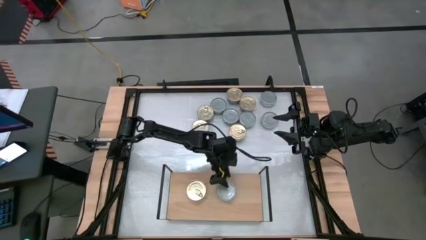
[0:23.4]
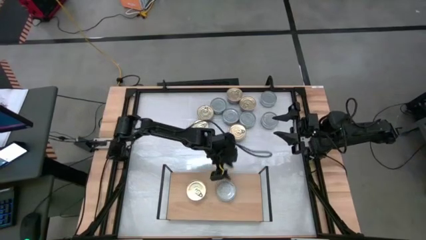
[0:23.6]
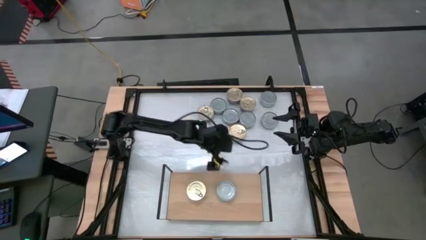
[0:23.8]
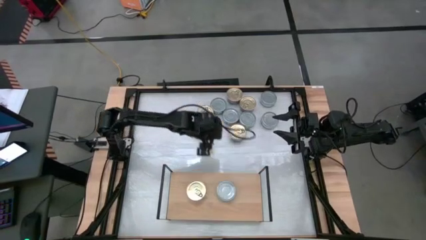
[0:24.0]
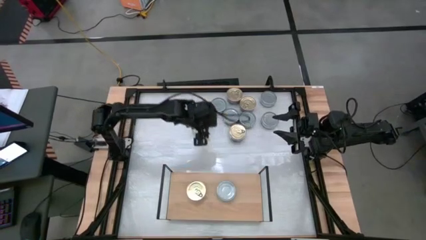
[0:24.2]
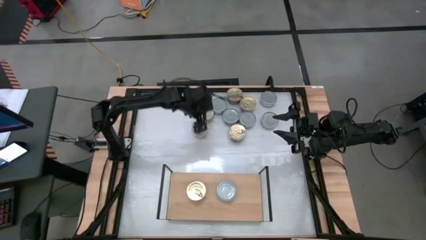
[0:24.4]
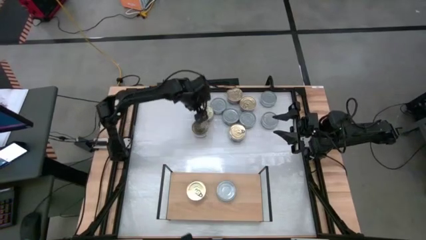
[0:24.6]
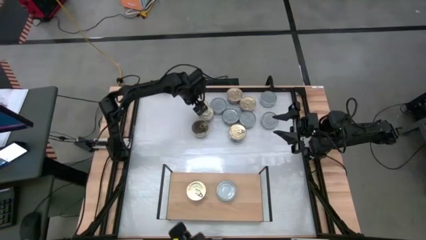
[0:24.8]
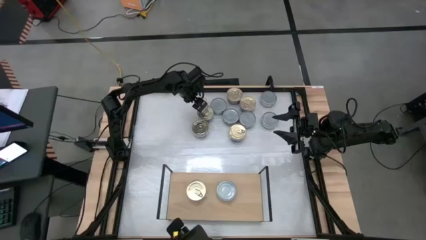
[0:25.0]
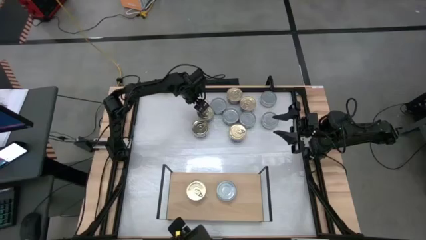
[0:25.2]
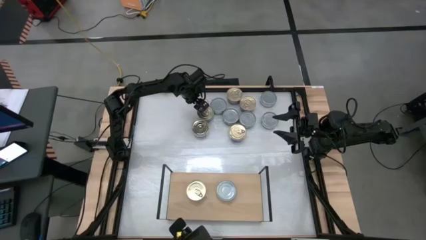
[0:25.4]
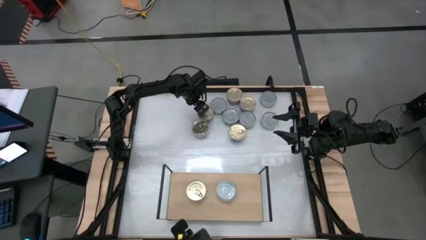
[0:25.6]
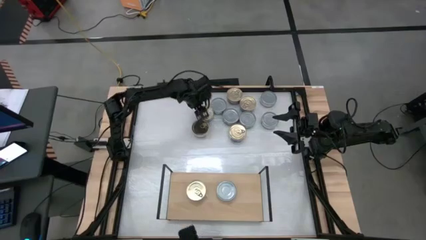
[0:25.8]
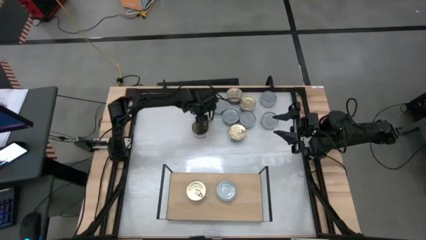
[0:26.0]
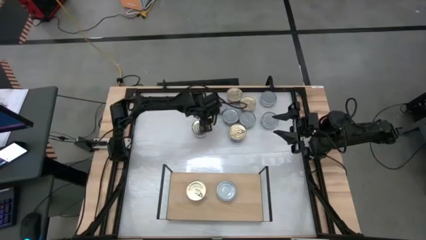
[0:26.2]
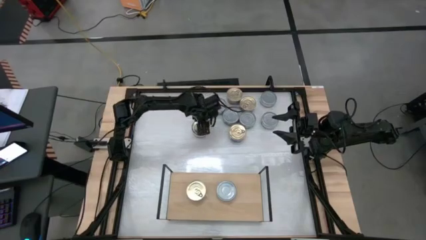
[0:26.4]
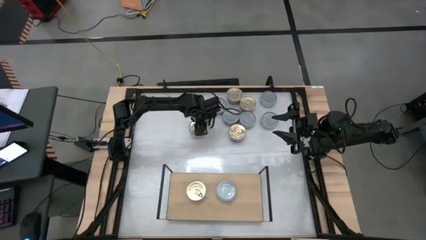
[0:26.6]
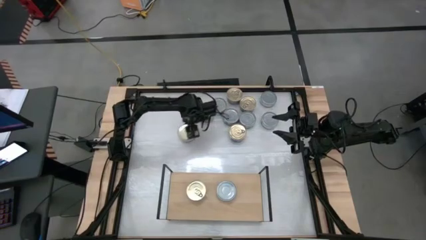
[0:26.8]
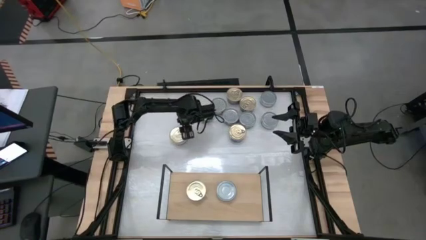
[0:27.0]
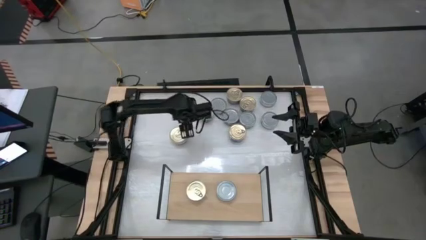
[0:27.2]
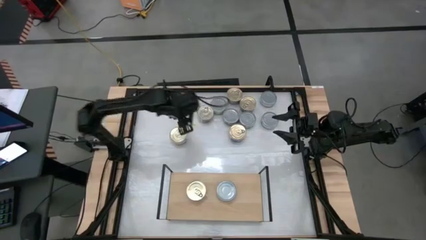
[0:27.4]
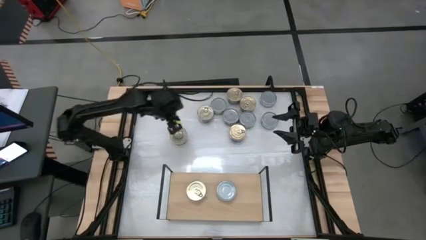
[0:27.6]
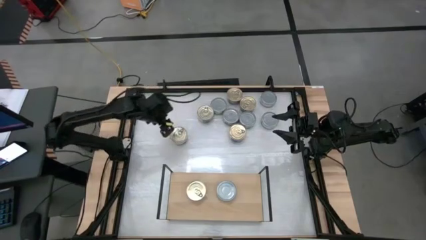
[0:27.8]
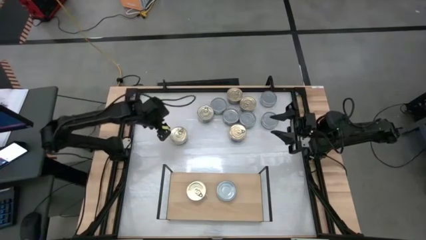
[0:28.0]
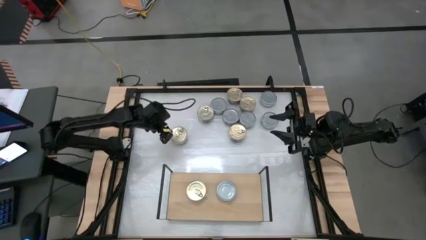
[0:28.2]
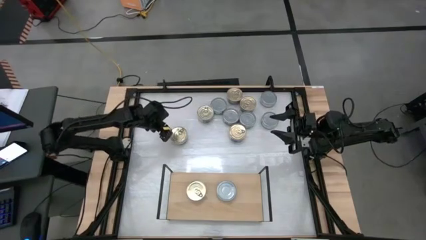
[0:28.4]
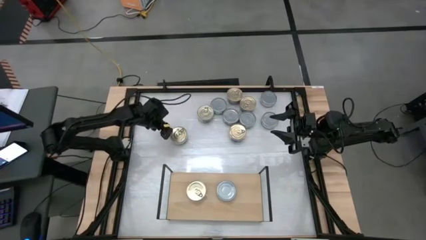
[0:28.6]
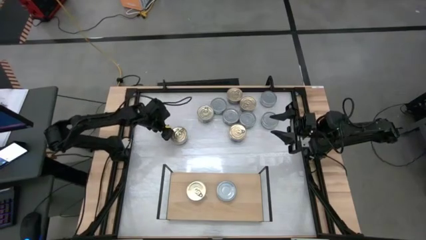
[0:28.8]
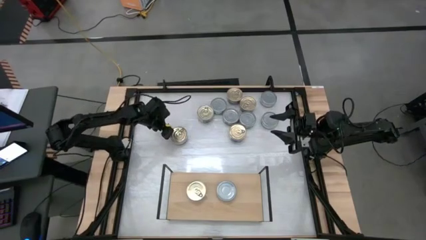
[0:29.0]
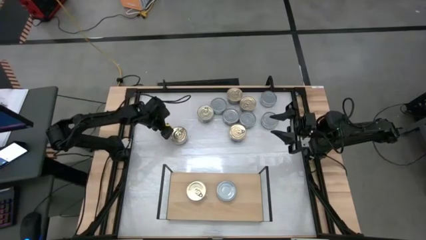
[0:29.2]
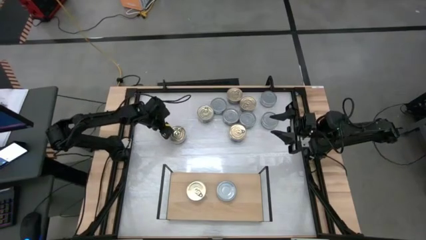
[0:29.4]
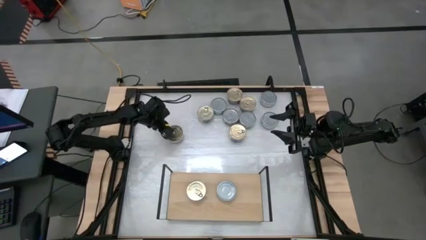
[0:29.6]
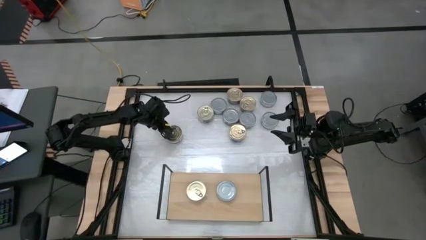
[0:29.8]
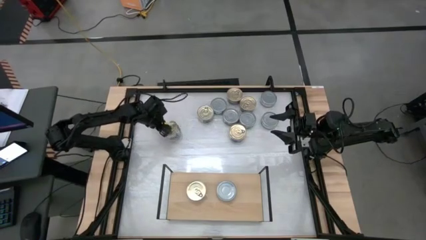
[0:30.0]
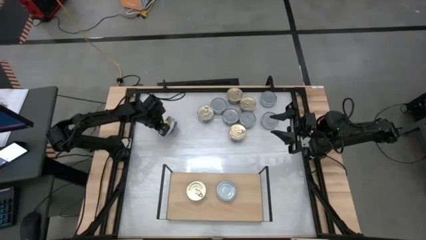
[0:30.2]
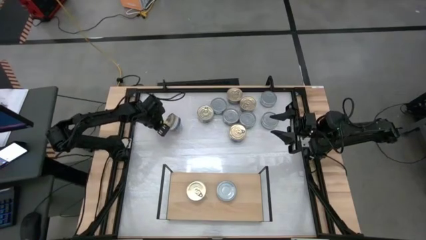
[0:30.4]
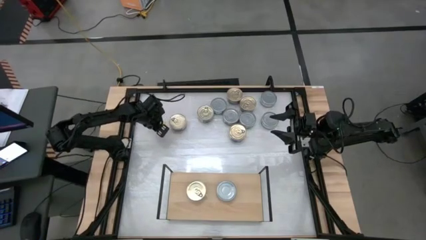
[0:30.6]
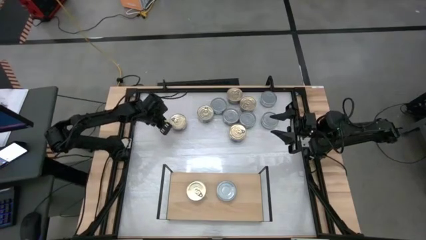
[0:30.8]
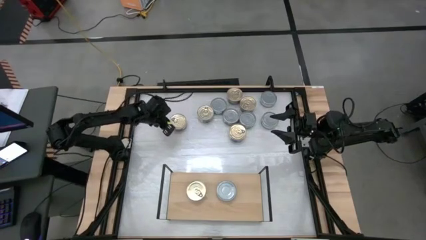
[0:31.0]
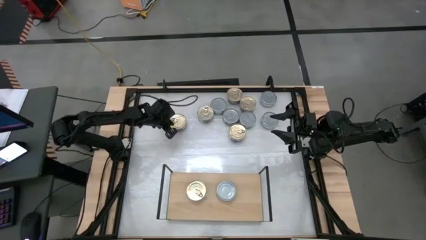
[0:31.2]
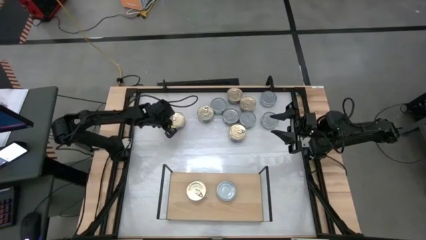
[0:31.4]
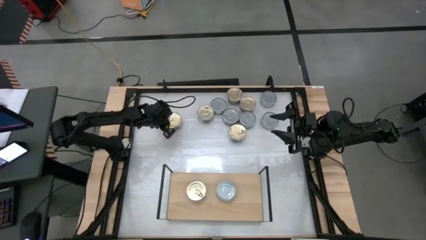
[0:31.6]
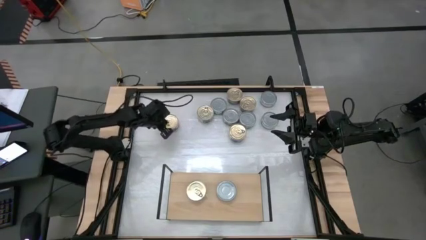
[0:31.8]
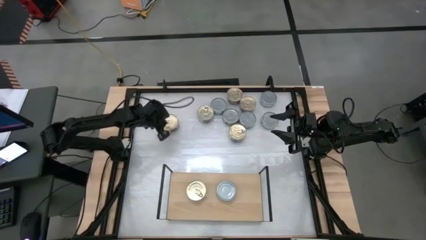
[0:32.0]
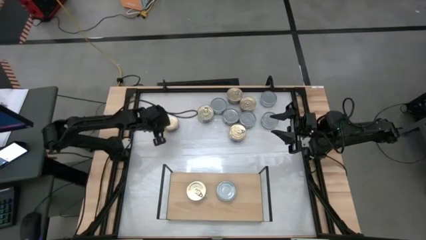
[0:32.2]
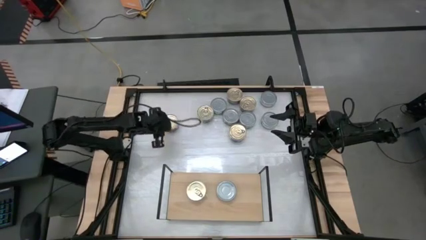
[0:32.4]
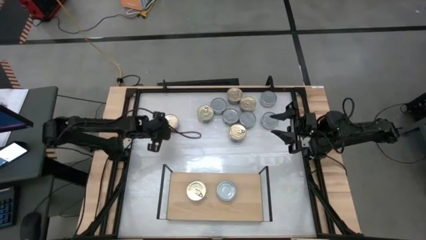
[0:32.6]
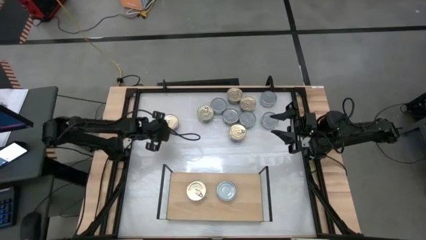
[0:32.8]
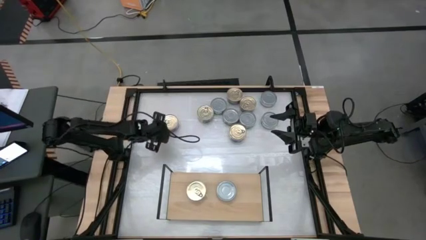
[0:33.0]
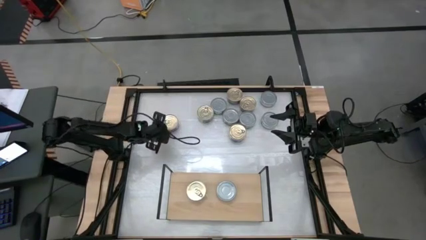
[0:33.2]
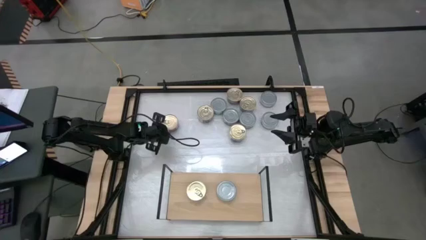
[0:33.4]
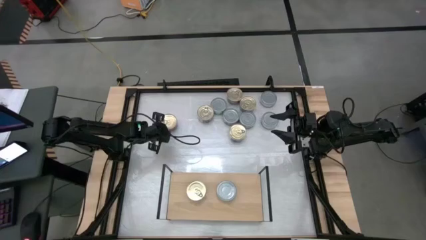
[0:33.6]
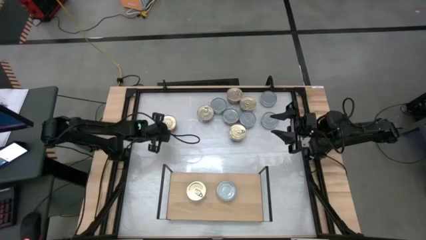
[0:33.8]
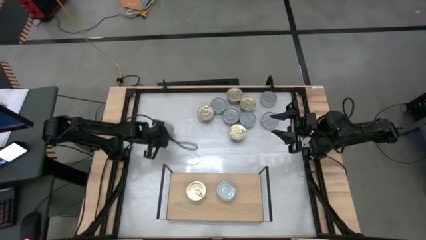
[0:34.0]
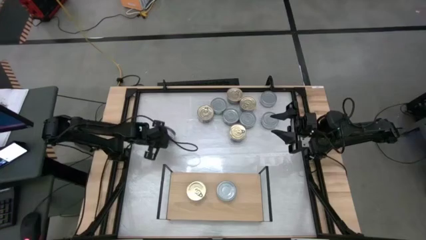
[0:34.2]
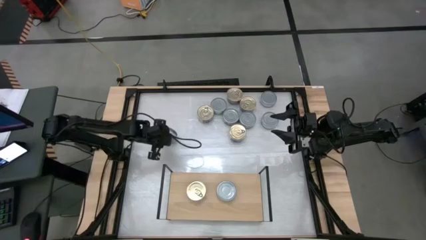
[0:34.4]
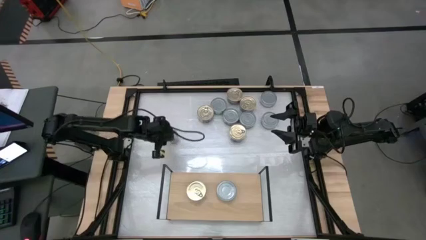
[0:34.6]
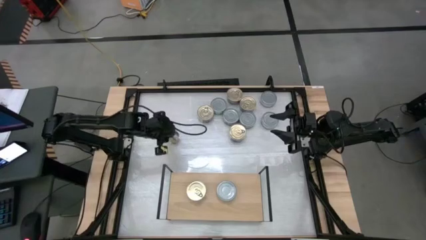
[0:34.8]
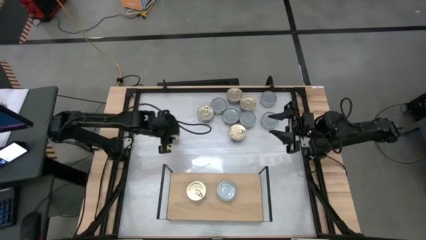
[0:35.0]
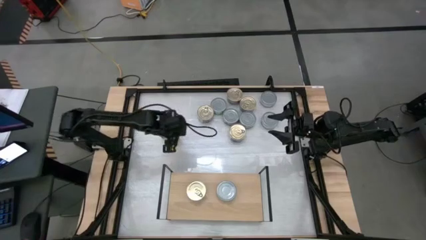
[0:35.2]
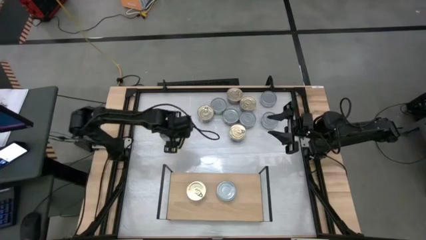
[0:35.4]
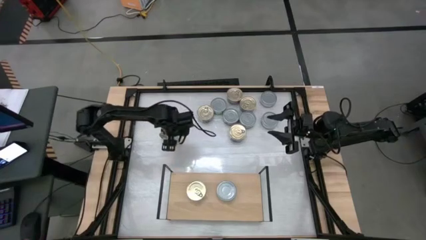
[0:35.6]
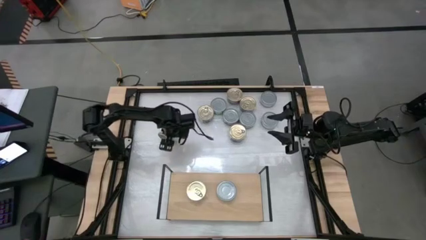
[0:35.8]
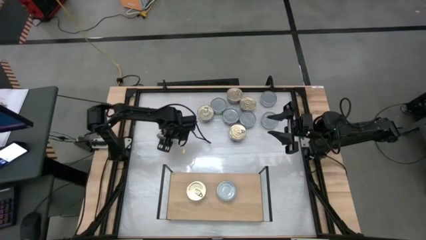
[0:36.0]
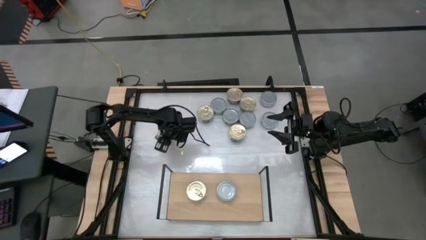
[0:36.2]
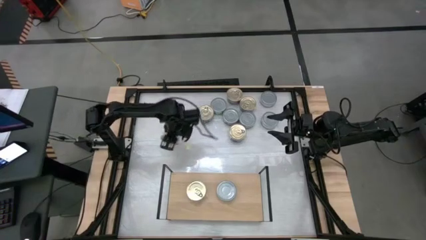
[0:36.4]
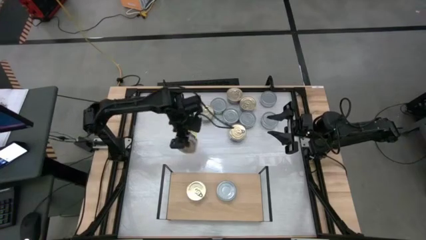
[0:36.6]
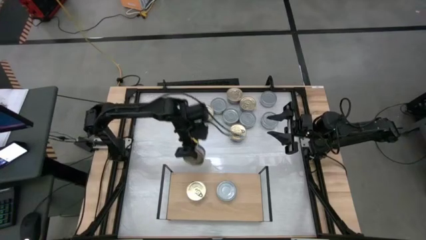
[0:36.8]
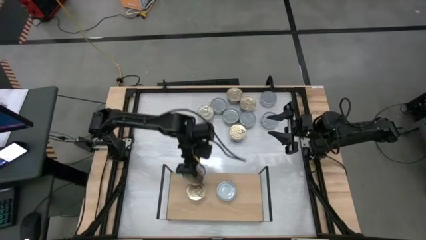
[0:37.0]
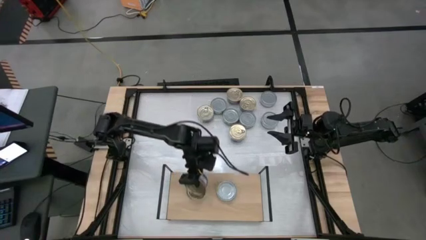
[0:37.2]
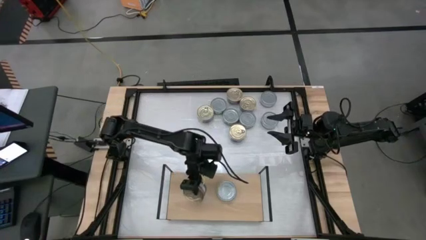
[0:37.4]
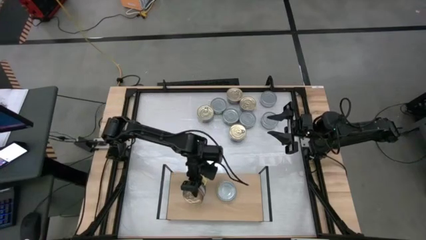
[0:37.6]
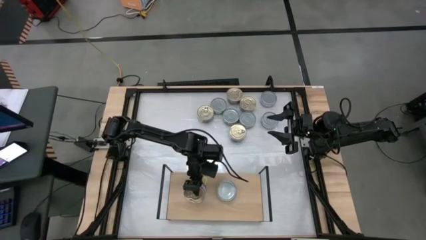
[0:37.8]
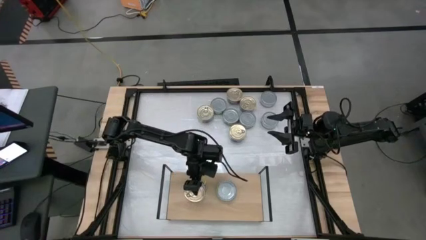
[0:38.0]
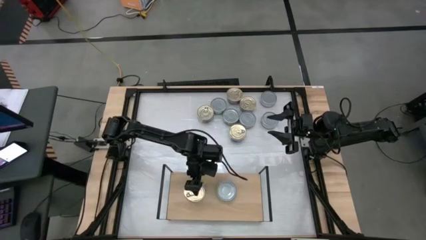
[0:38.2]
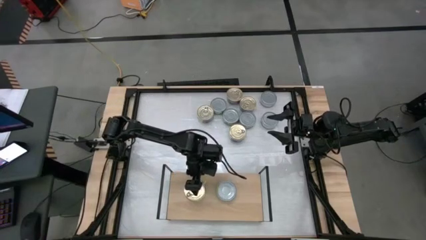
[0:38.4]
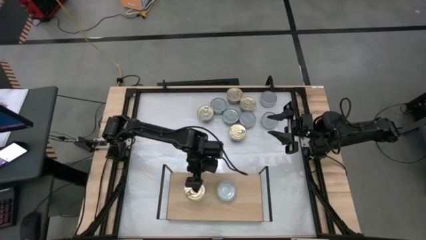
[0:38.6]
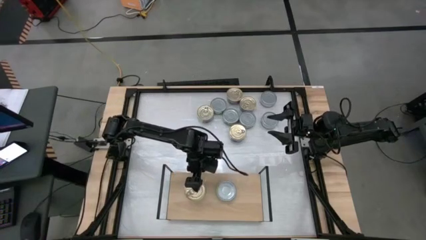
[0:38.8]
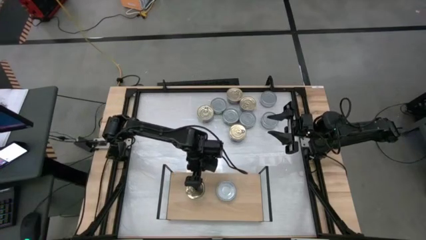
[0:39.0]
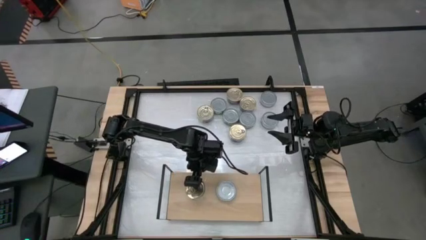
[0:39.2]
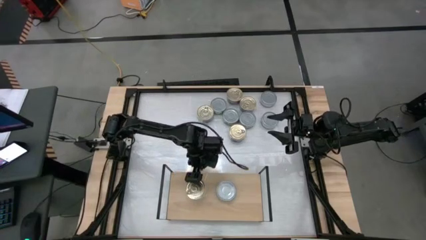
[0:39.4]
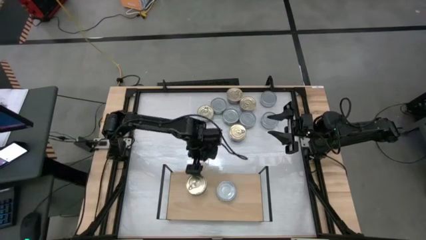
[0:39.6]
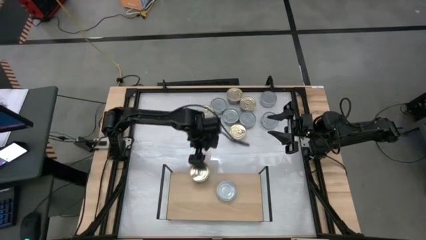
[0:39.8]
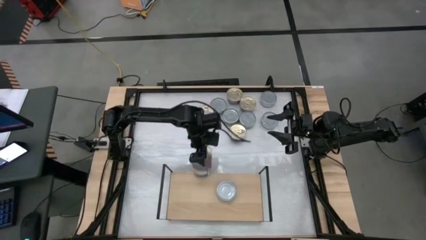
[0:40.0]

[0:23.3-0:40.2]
Task: Stack canned seafood by type on shelf
Stack the blue tuna can on top of the blue tuna can on the shelf
